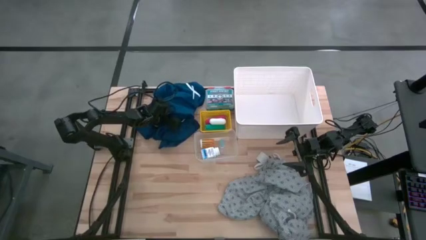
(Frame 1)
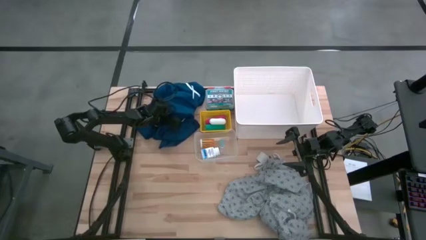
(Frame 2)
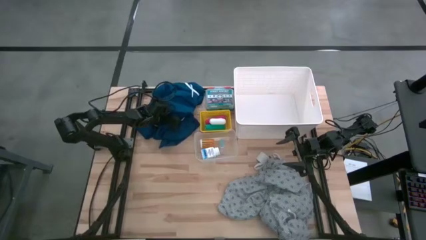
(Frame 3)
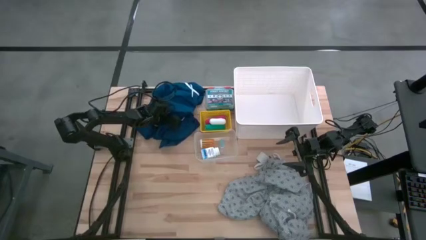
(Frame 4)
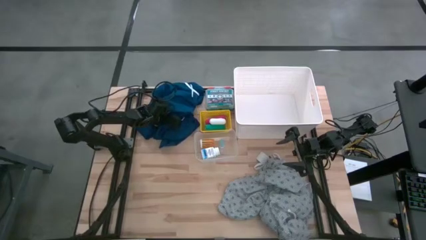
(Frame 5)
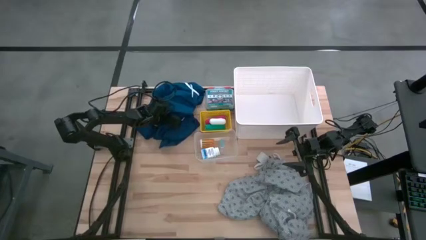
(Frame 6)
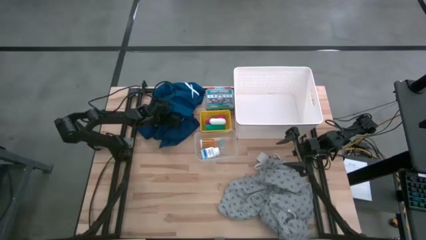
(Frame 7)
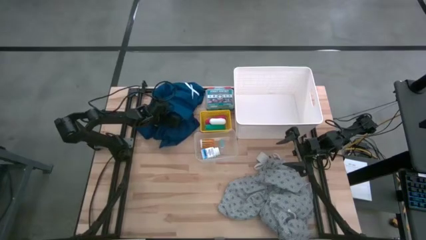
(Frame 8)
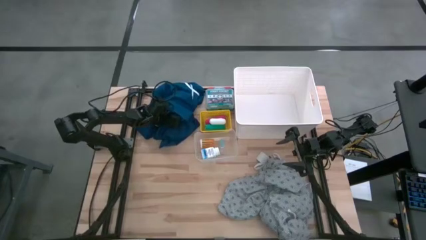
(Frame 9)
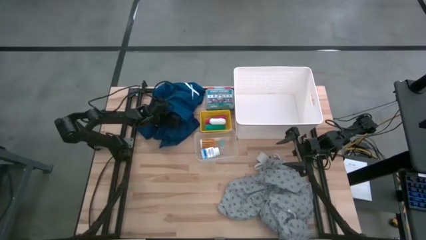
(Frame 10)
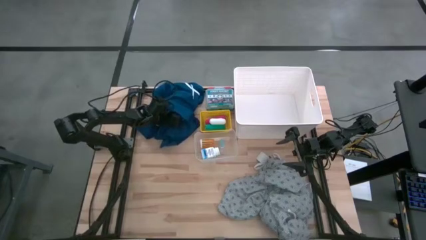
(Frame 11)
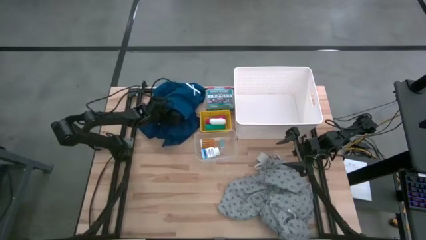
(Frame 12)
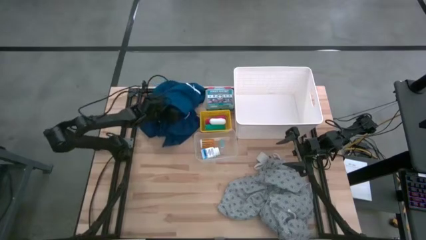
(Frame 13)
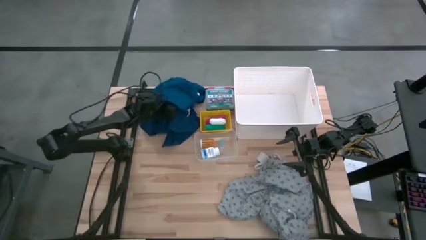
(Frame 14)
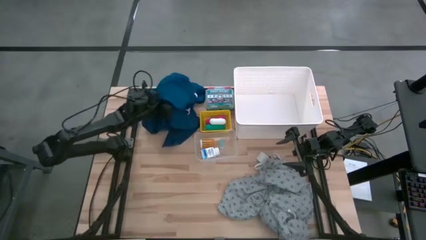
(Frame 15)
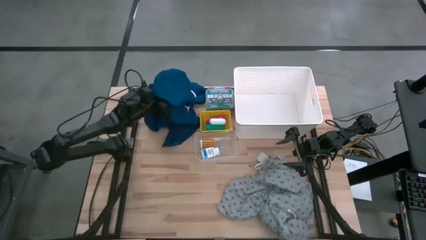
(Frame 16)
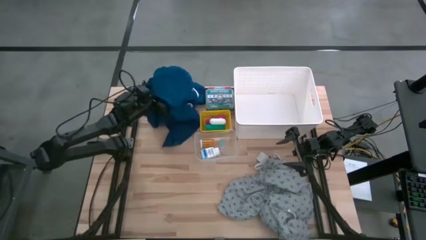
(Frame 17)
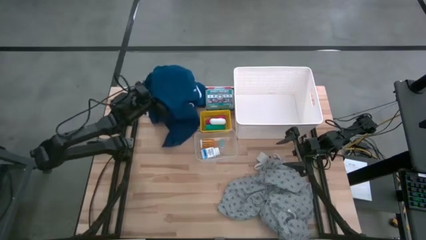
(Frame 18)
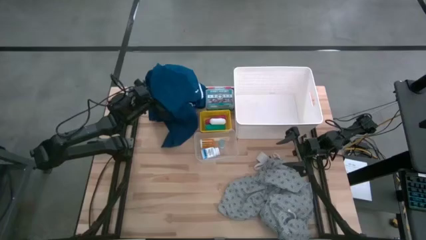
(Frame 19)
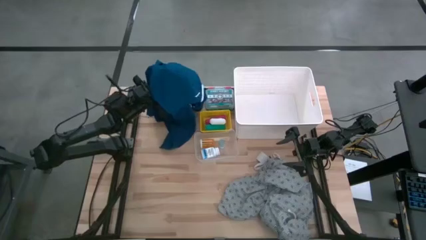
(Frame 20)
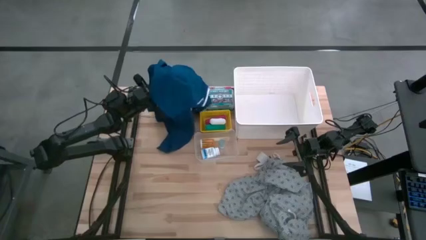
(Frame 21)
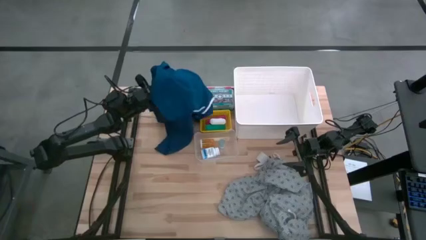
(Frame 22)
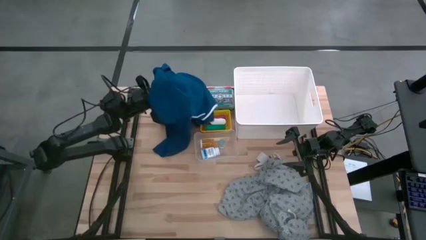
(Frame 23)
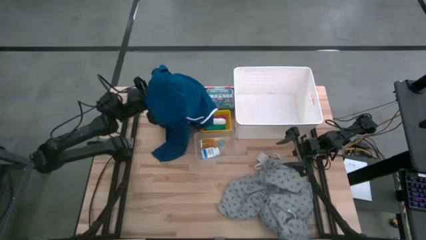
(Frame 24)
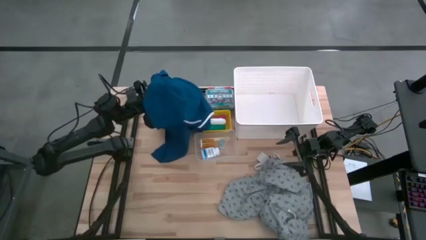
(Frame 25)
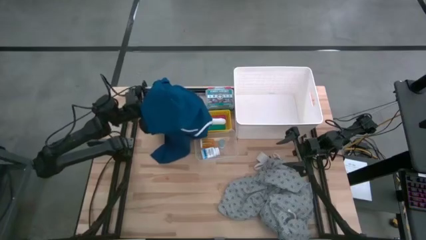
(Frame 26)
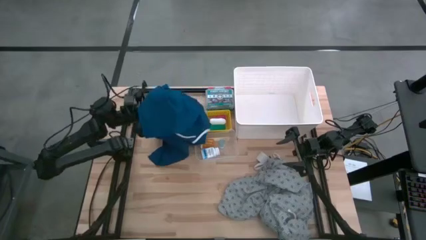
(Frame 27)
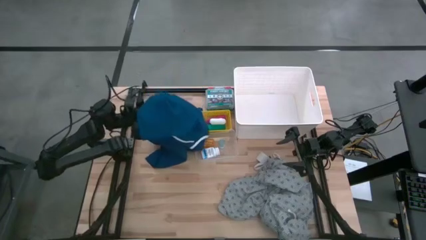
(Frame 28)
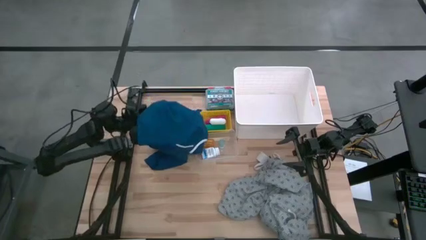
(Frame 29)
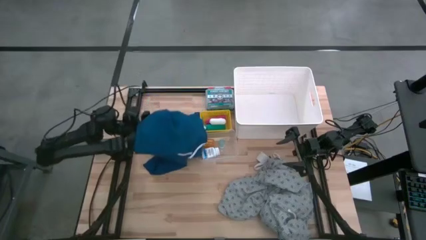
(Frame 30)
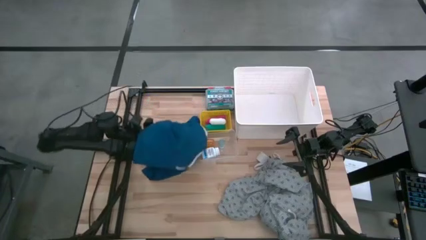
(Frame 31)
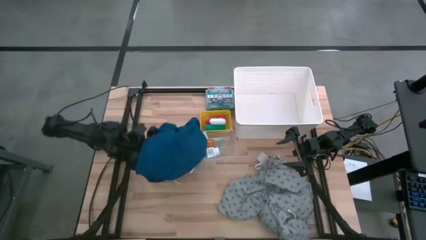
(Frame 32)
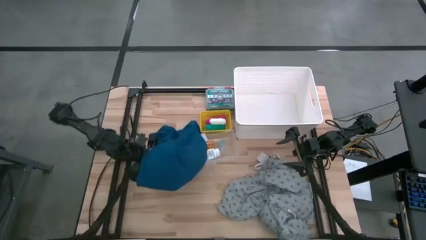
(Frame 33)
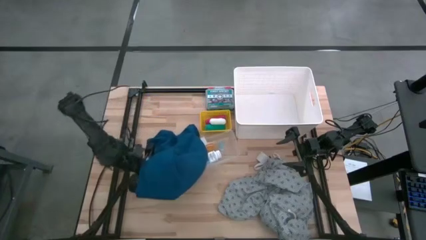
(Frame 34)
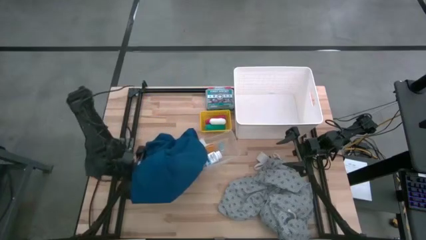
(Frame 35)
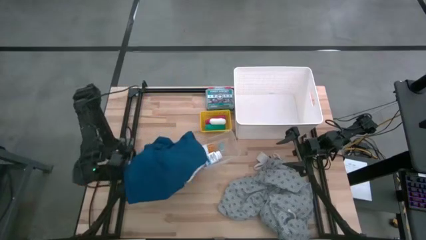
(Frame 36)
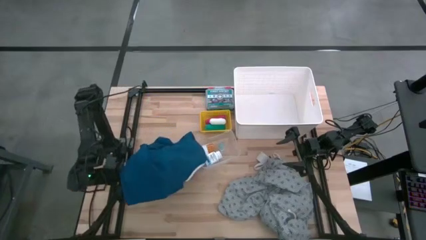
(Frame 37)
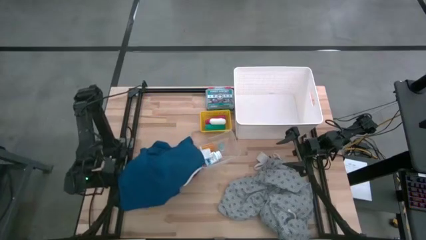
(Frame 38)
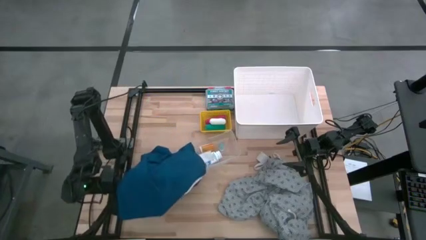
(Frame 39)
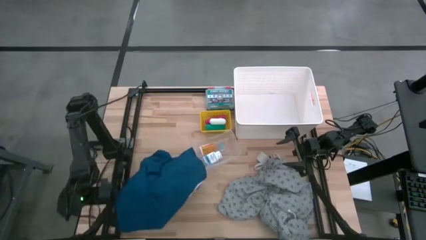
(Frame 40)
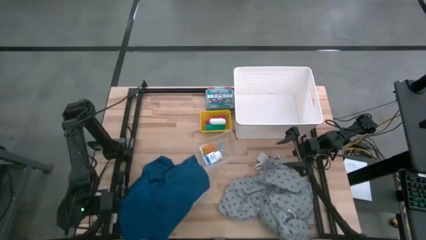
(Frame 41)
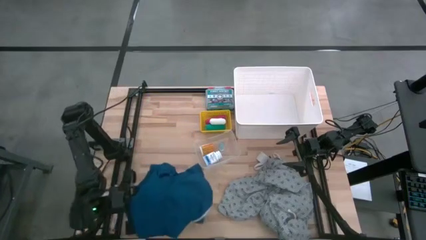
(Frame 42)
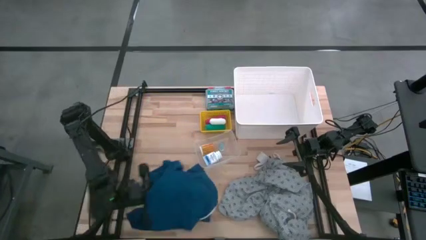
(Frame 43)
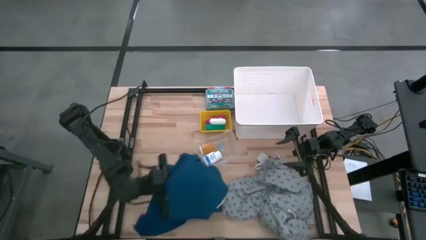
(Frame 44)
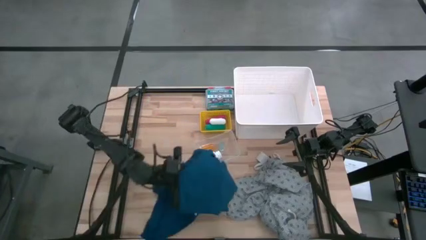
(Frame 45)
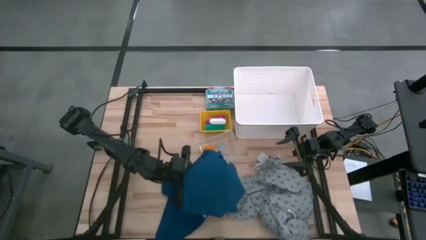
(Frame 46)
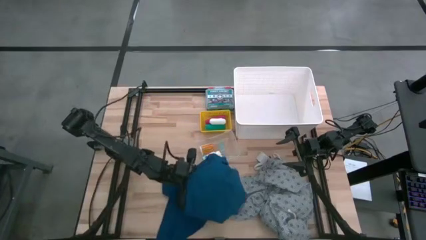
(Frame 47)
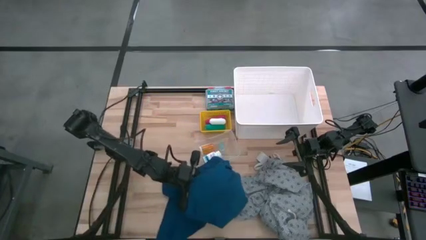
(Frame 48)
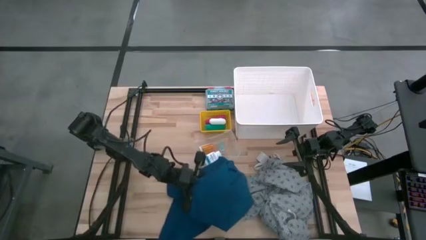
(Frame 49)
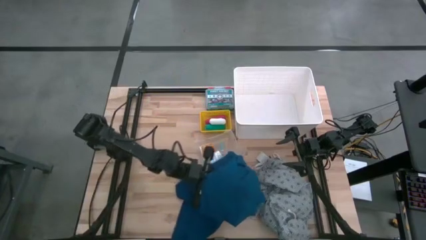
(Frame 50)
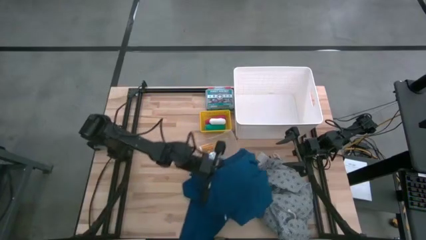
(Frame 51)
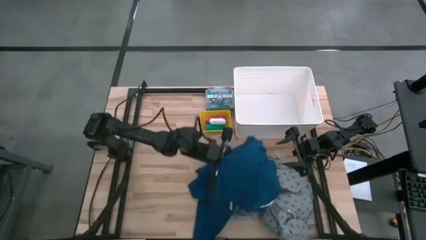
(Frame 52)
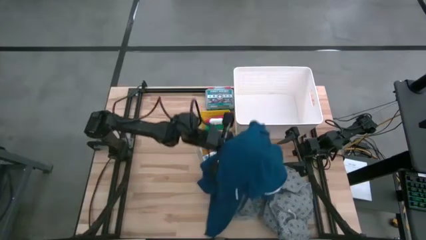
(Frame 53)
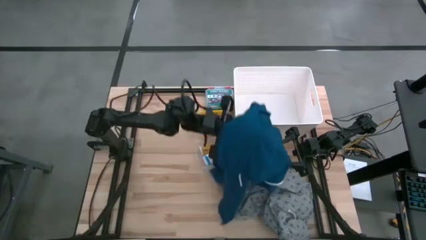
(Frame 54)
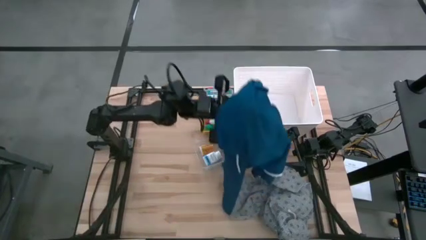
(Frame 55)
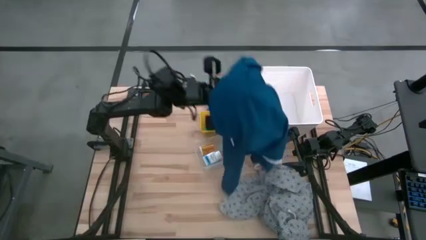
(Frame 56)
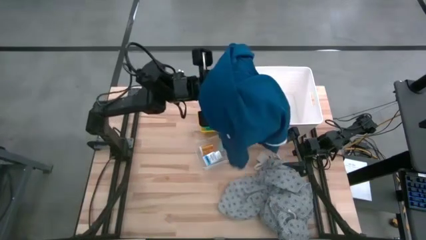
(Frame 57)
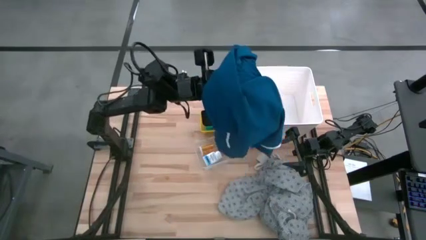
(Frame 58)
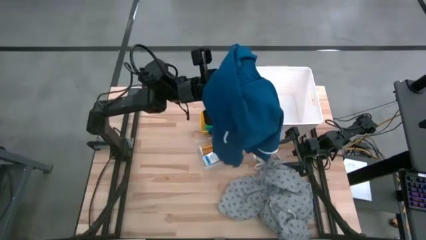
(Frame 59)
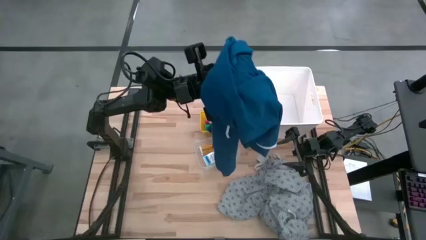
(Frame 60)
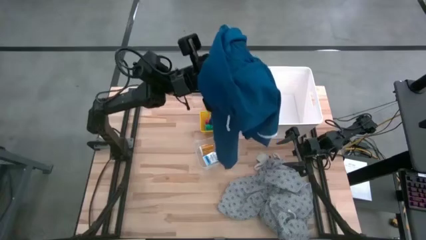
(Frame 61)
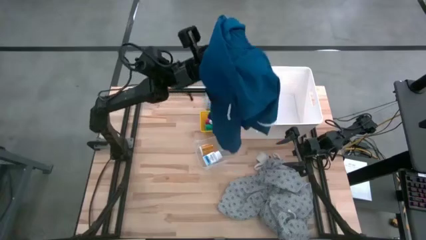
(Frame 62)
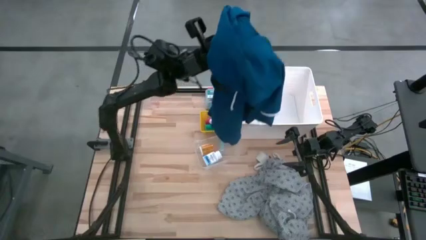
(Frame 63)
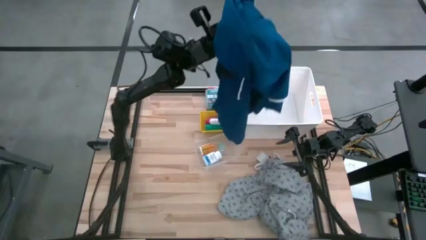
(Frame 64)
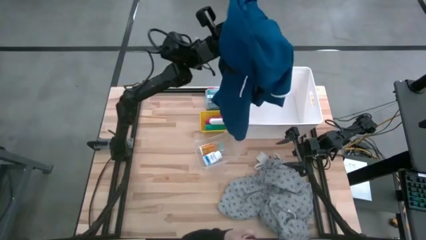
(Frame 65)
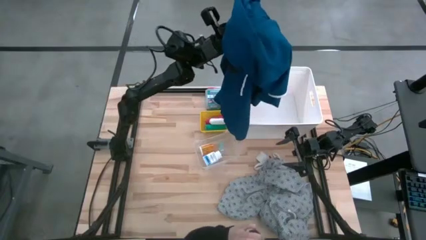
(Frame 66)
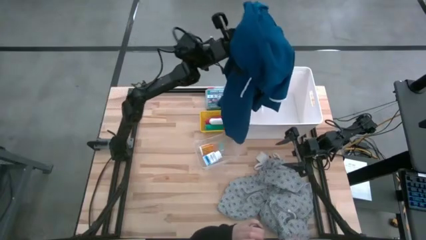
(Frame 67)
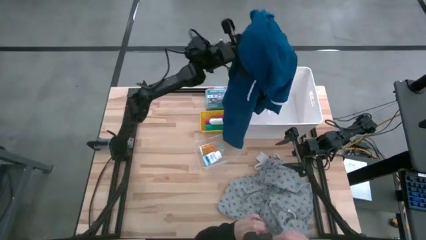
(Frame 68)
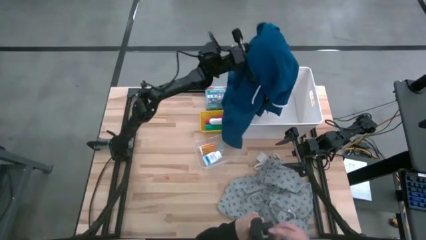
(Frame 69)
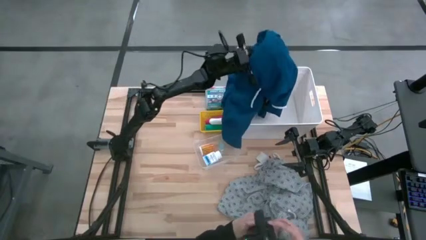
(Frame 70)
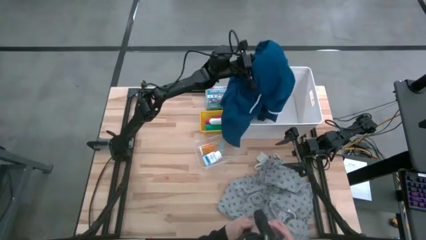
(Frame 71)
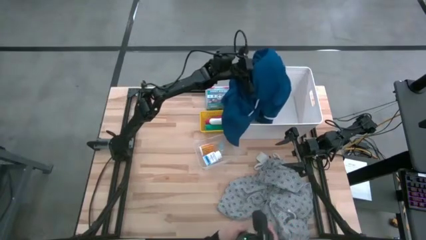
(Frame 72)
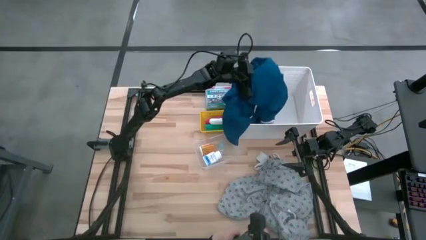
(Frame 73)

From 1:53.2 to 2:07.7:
Task: Pick & Place Medicine items
Put the blue patient gown into the white bin
